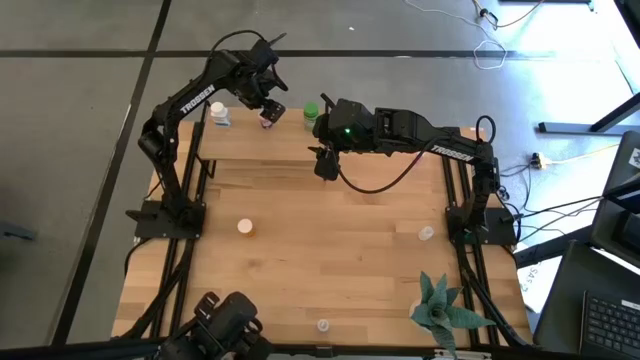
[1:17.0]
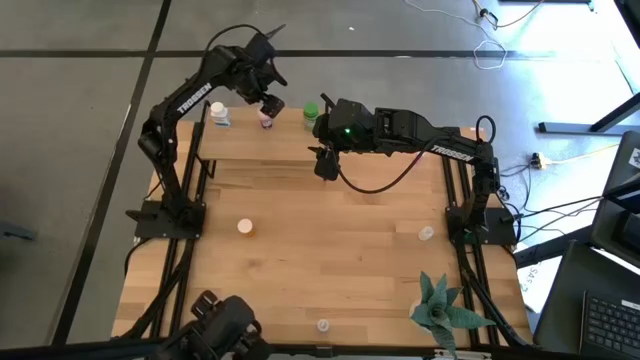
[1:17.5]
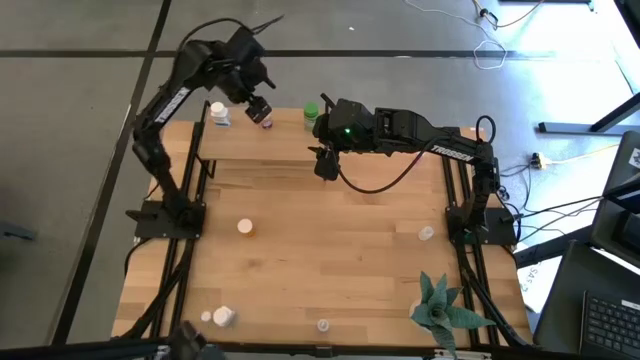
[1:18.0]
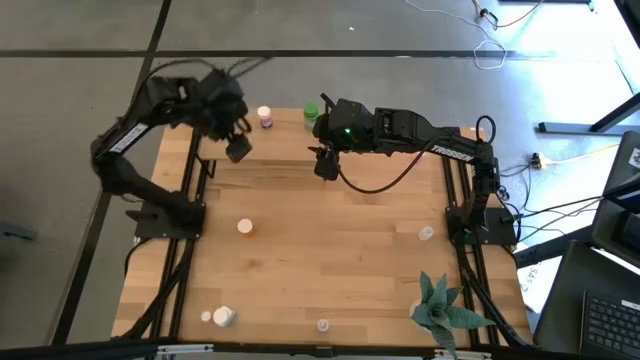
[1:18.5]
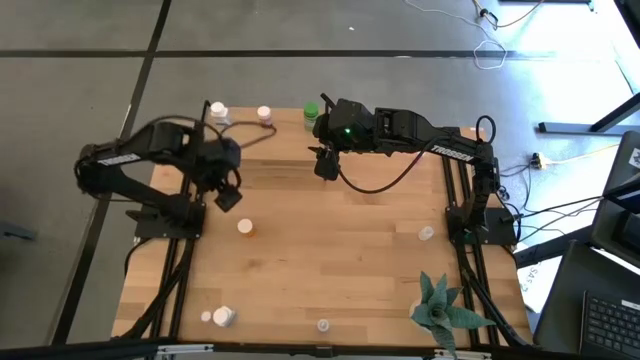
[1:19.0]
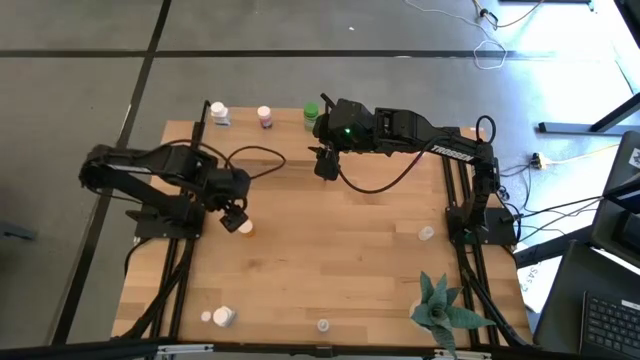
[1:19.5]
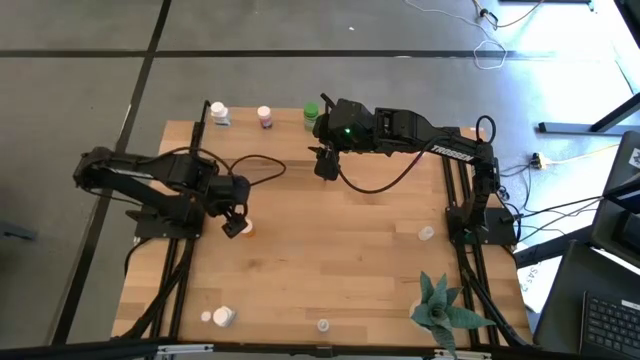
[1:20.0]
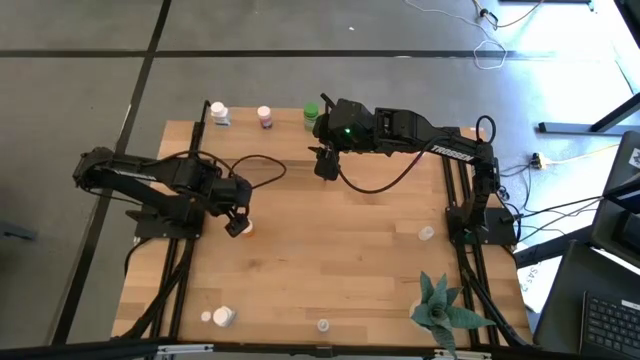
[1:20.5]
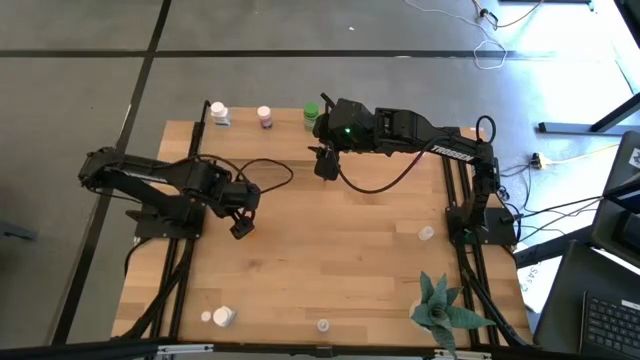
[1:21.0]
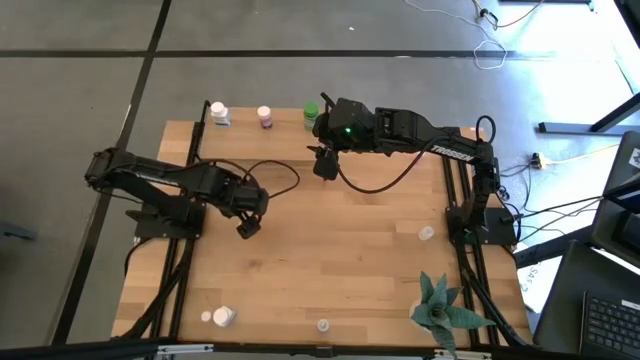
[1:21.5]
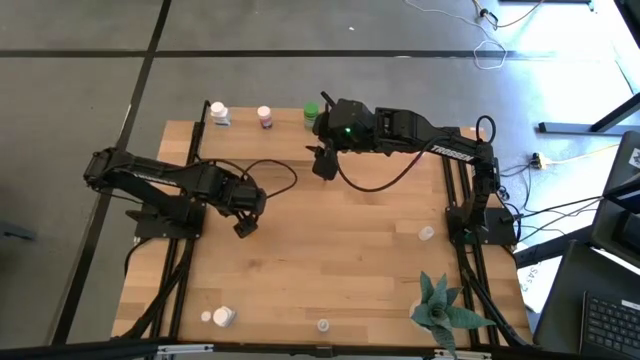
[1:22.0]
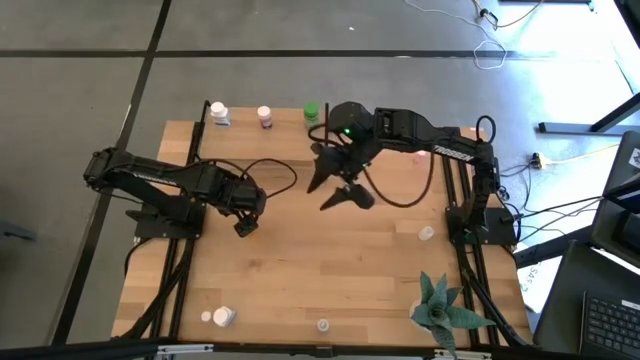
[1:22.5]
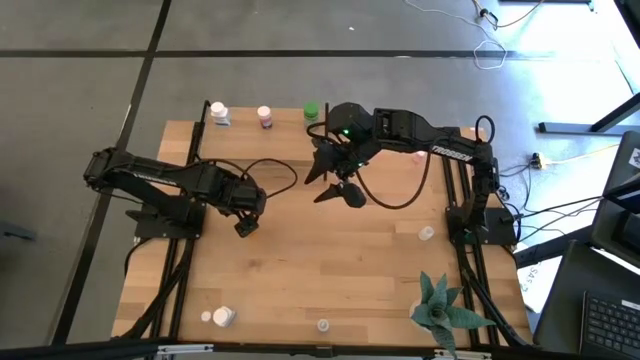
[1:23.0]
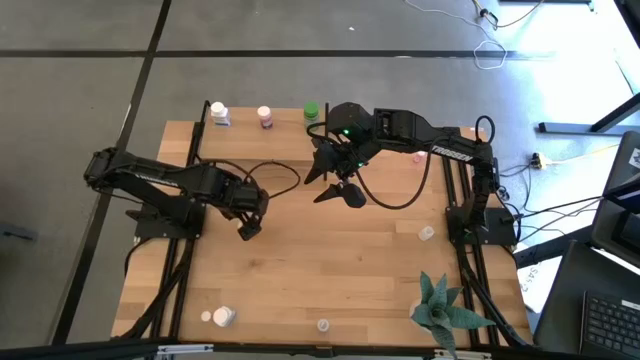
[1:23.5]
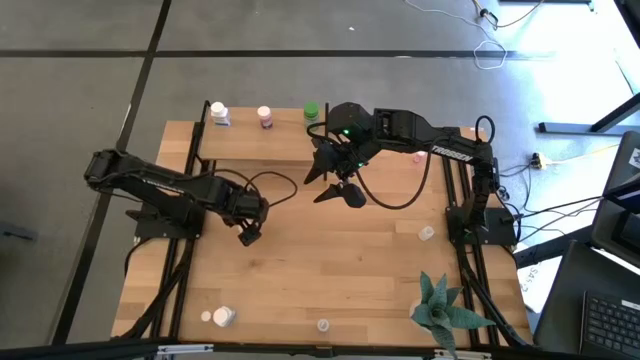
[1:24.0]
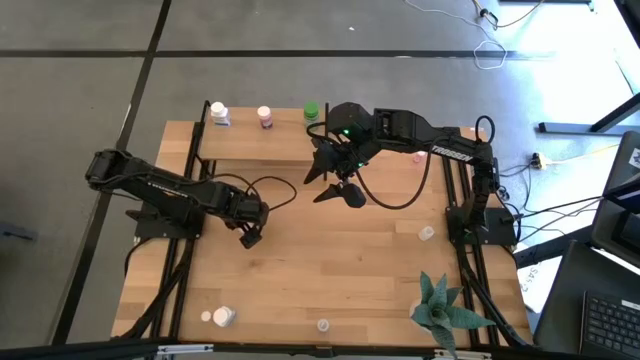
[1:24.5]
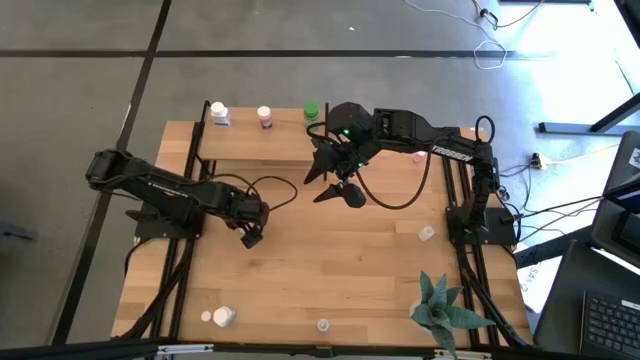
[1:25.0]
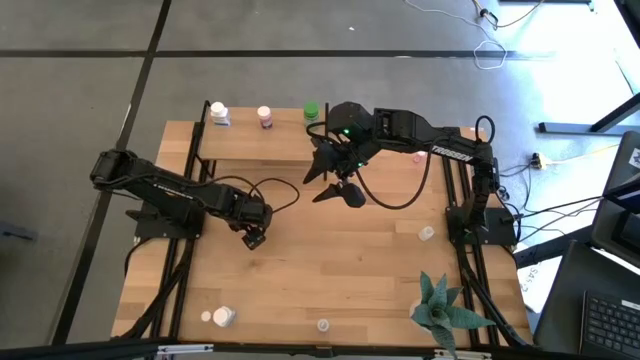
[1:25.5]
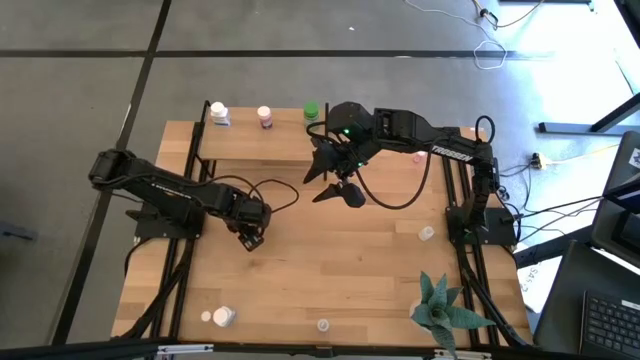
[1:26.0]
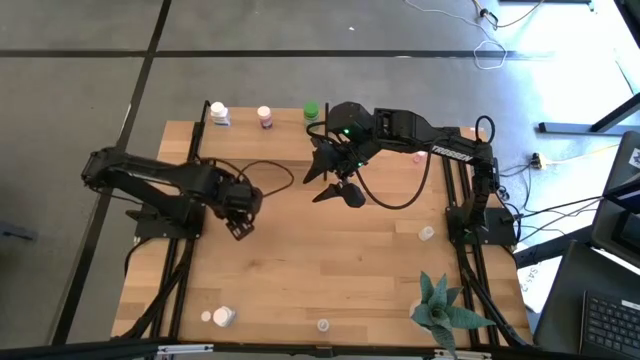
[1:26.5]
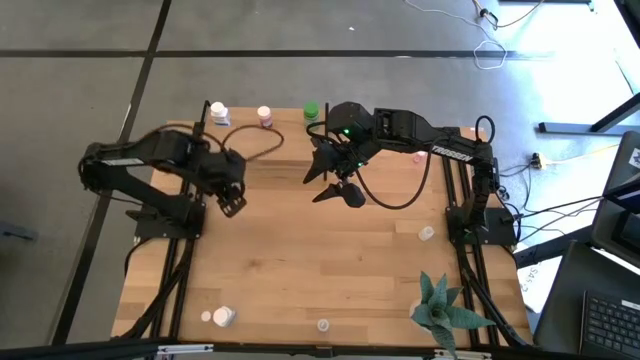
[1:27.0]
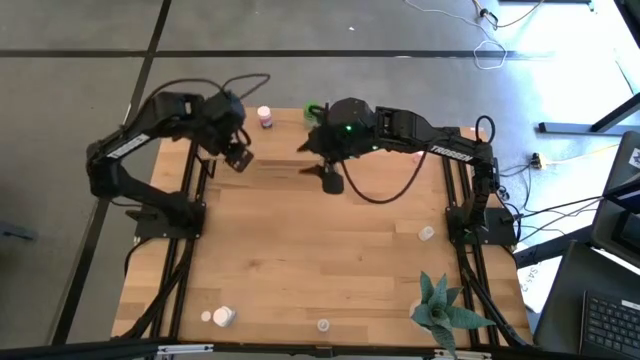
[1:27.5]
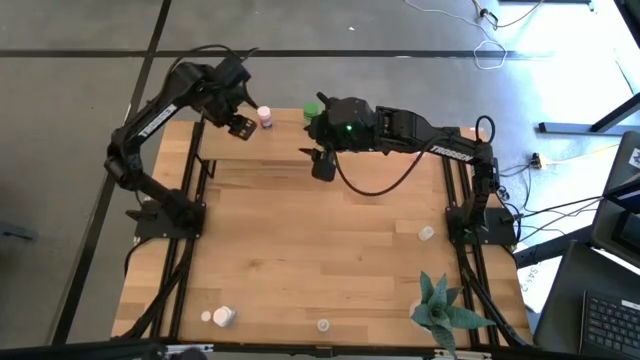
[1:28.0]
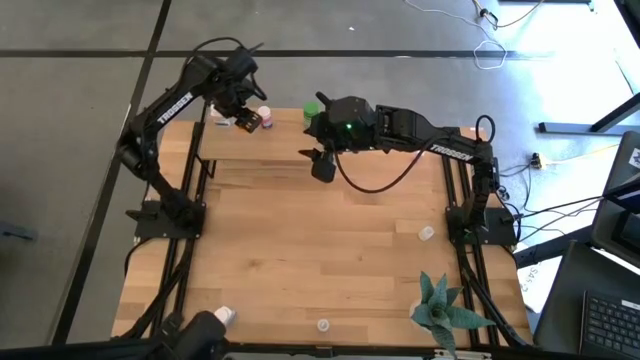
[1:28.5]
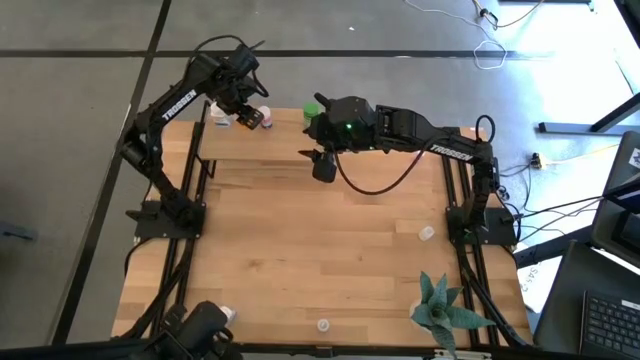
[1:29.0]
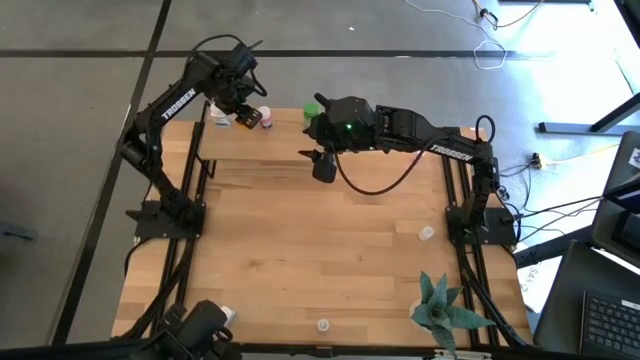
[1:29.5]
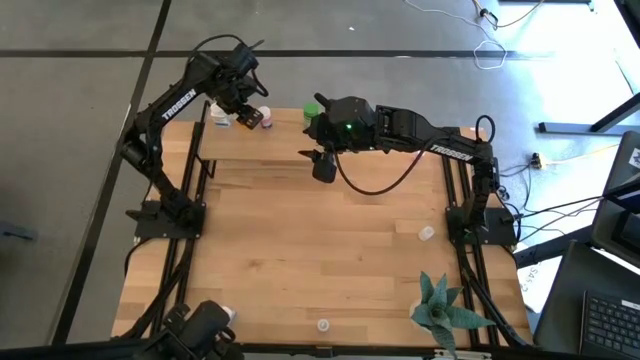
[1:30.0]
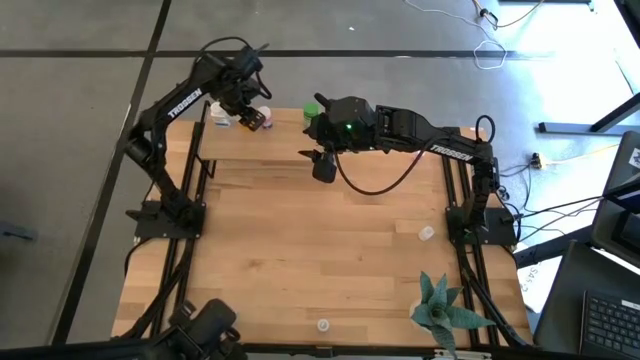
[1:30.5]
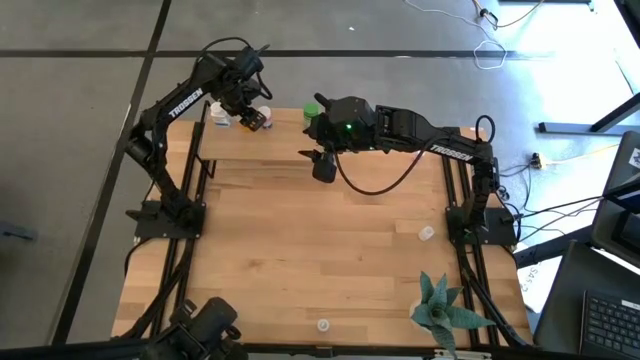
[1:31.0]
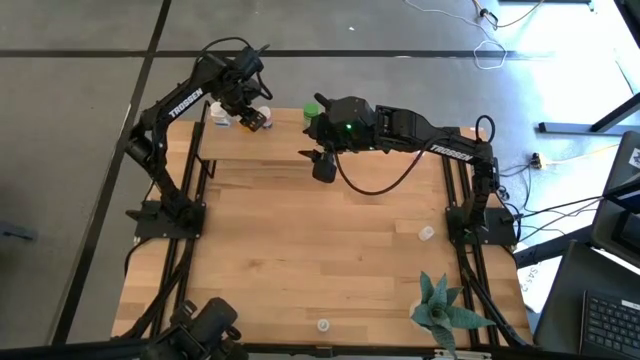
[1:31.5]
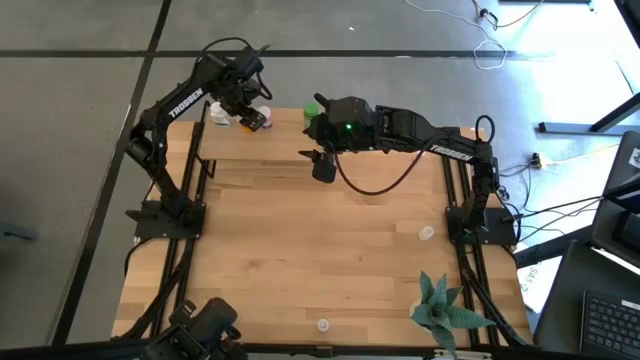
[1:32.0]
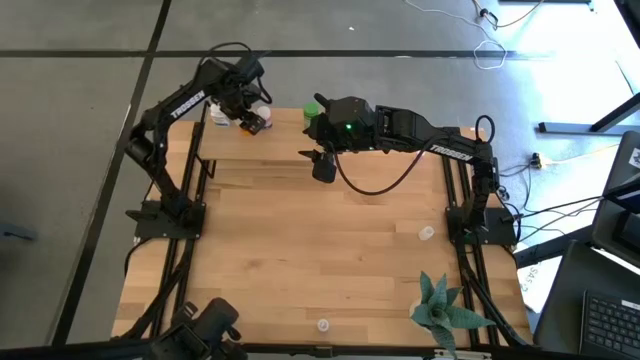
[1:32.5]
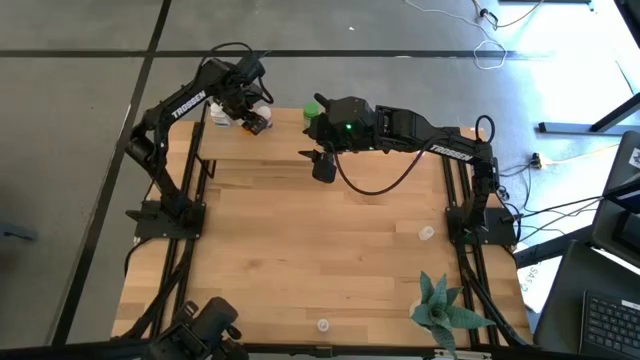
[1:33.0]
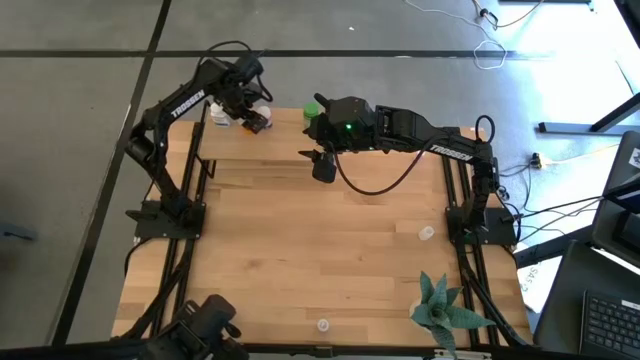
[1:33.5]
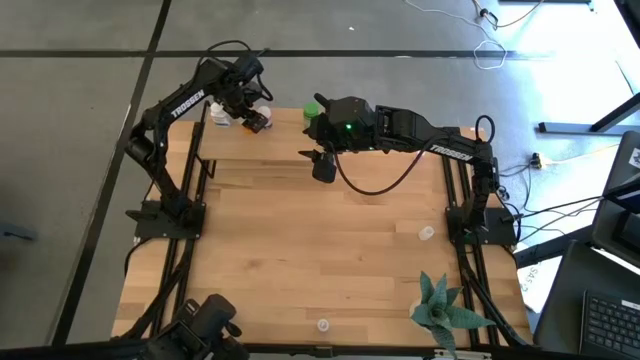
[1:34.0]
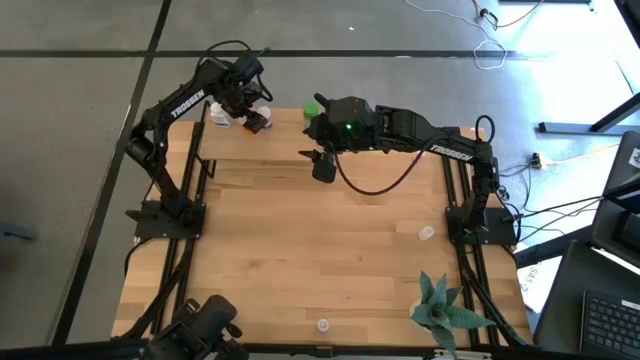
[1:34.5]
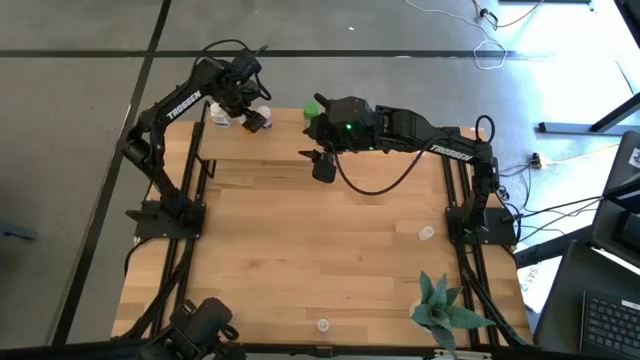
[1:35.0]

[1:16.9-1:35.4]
Task: Pick and place medicine bottles onto shelf by color
Put the orange pill bottle on the shelf

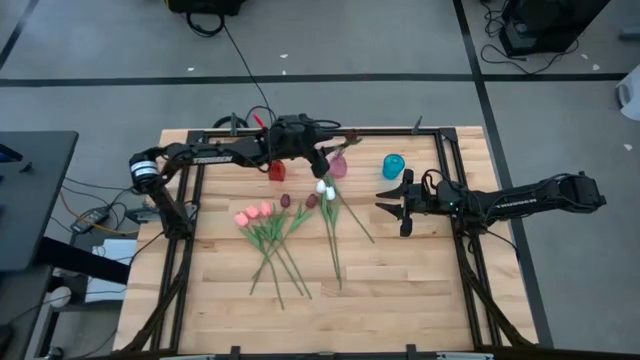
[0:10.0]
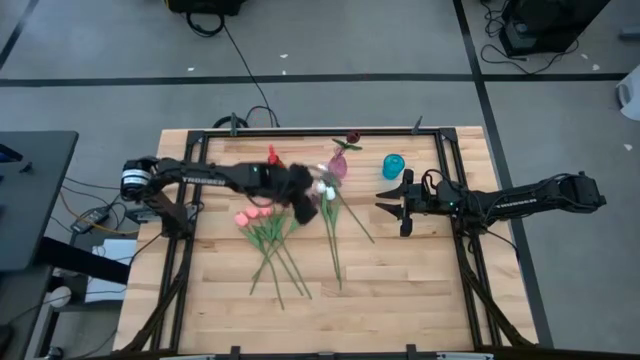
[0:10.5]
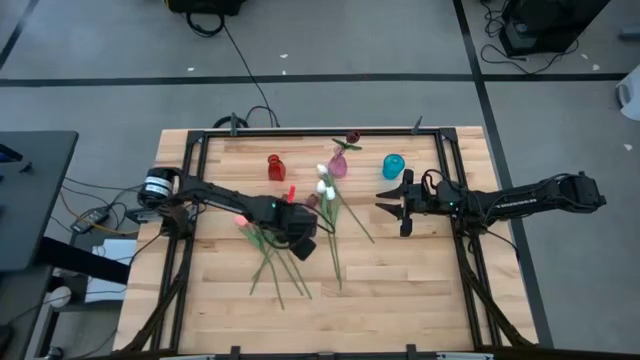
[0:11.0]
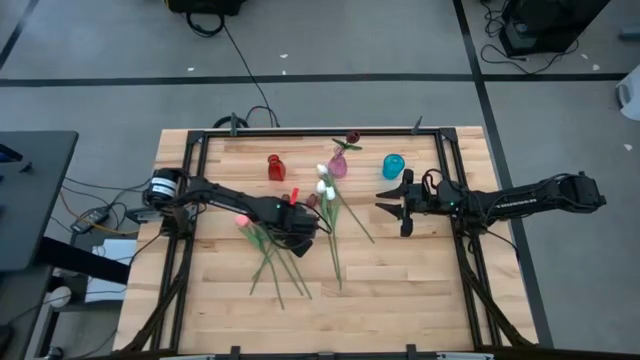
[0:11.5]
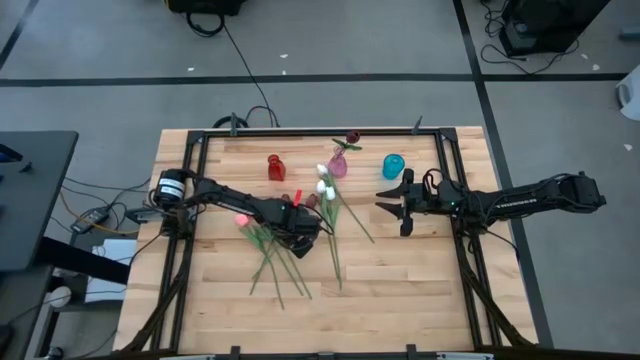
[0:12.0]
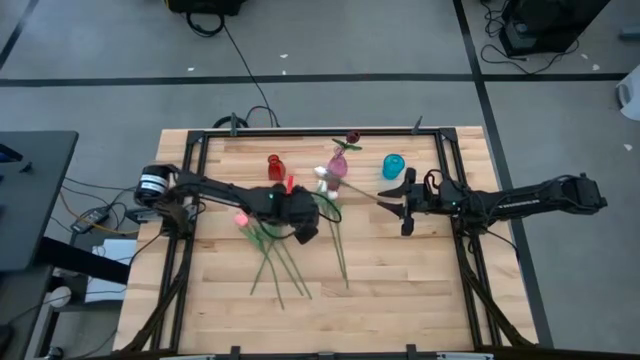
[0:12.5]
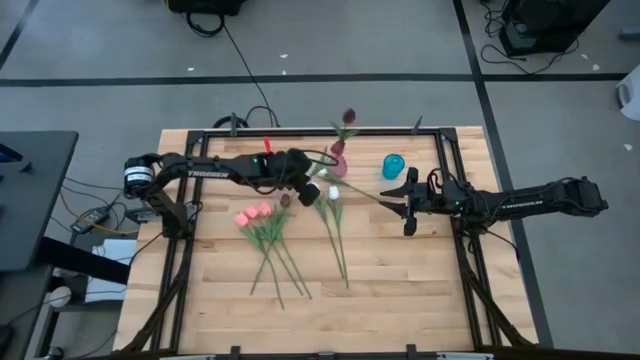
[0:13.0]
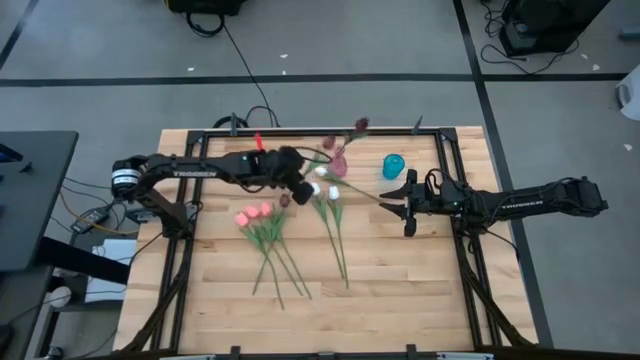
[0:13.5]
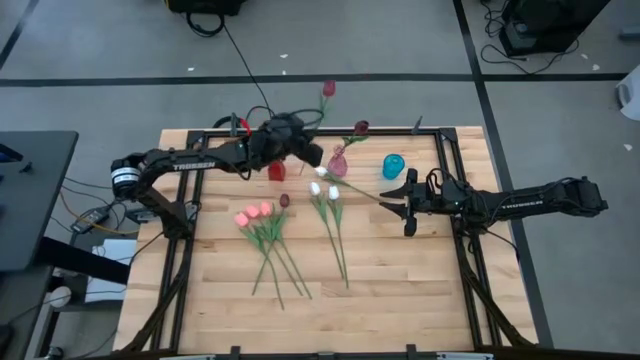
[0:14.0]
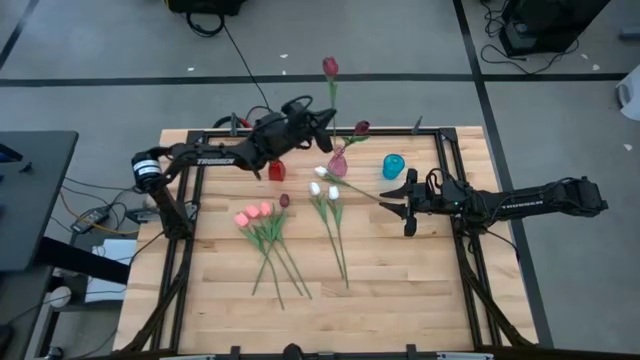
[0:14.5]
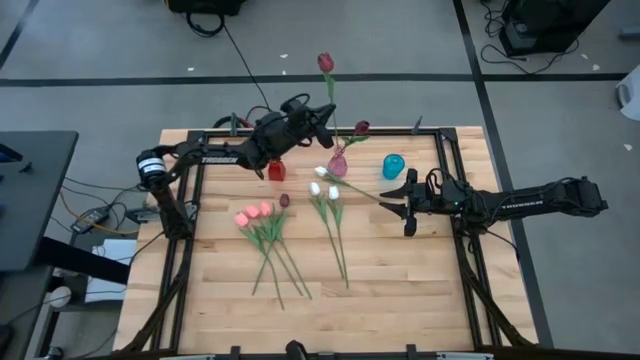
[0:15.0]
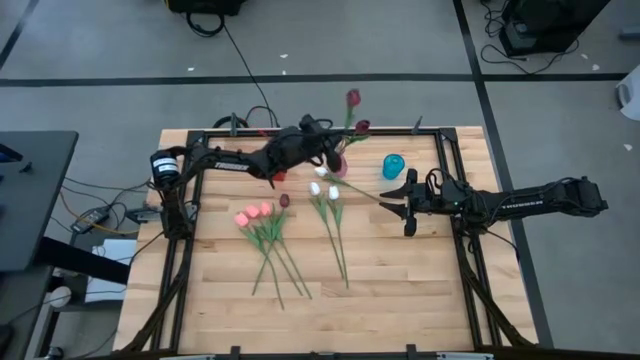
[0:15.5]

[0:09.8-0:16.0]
Task: Sort flowers into vase by color
Put the right dark red flower into the pink vase
